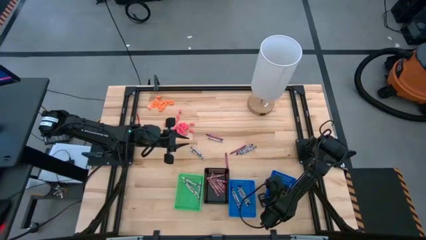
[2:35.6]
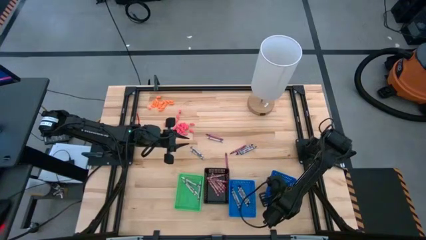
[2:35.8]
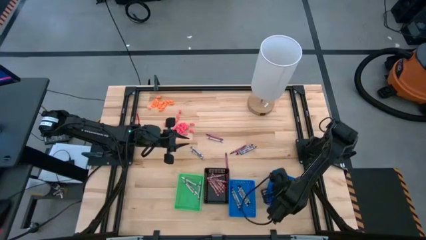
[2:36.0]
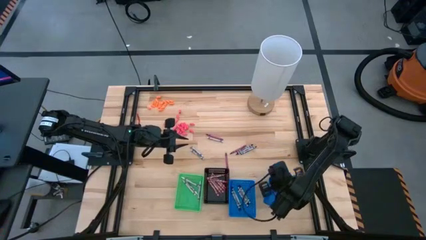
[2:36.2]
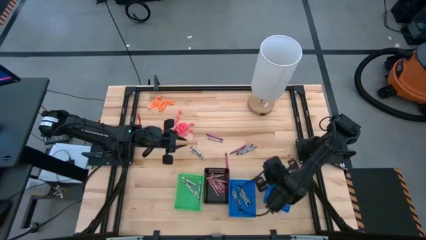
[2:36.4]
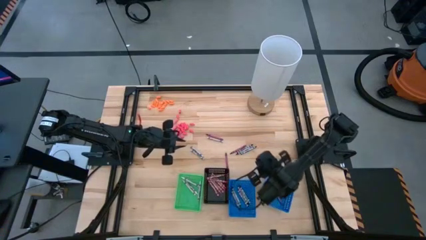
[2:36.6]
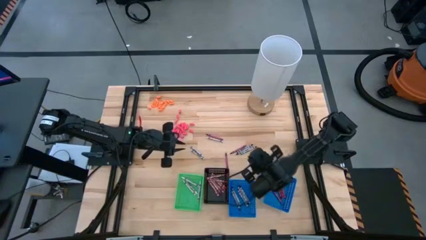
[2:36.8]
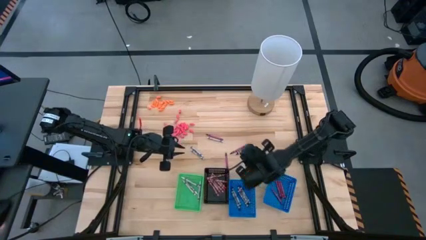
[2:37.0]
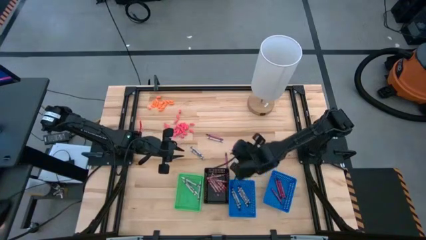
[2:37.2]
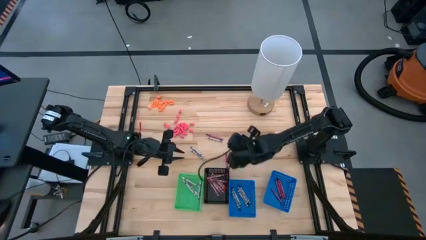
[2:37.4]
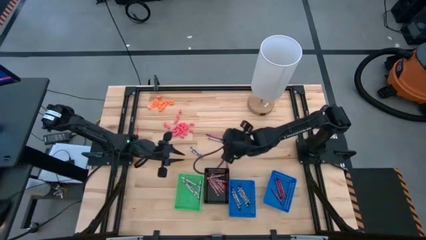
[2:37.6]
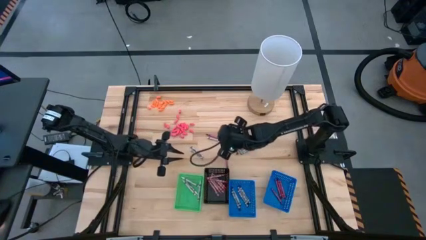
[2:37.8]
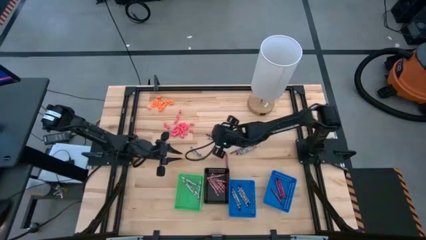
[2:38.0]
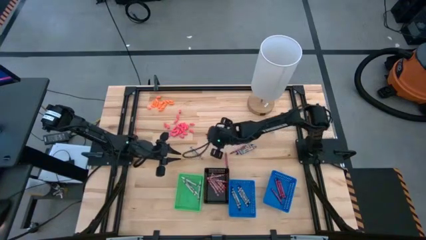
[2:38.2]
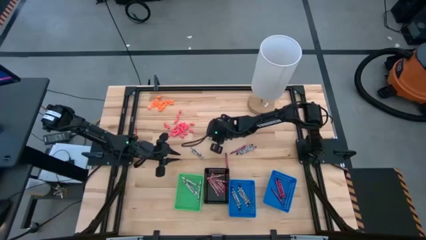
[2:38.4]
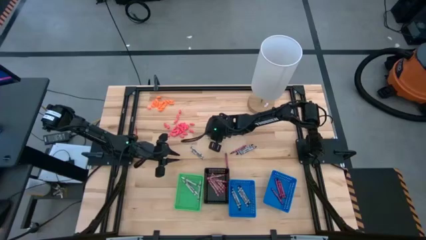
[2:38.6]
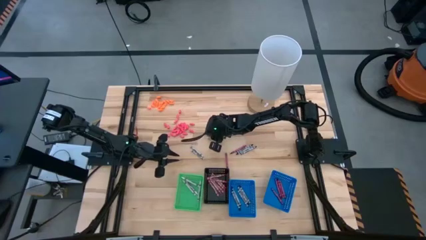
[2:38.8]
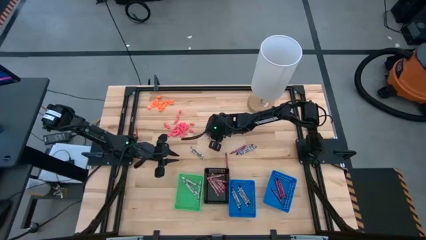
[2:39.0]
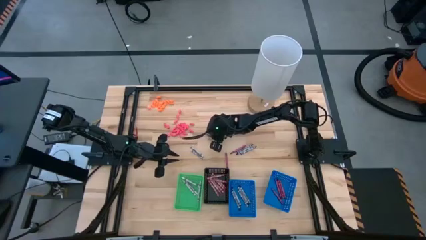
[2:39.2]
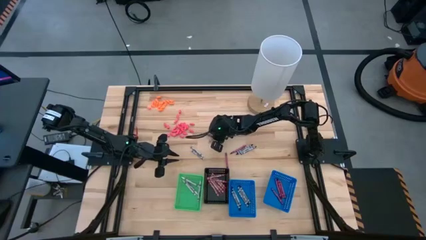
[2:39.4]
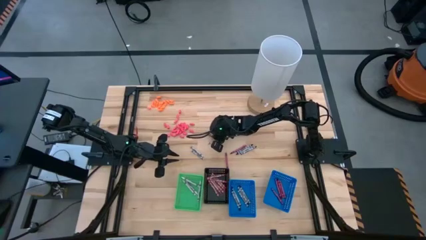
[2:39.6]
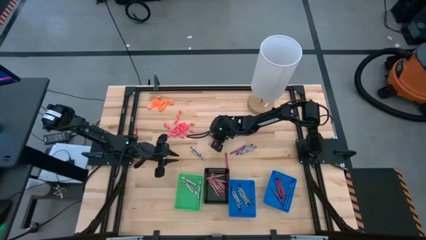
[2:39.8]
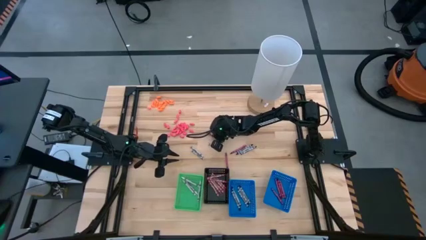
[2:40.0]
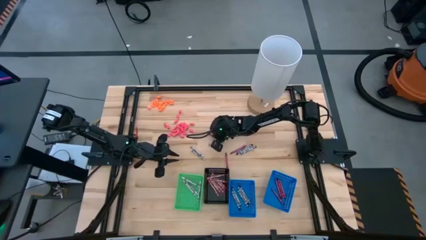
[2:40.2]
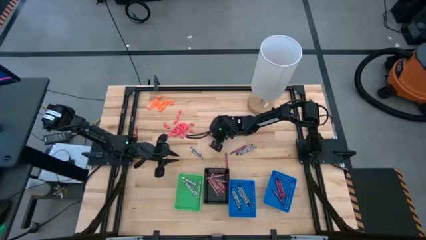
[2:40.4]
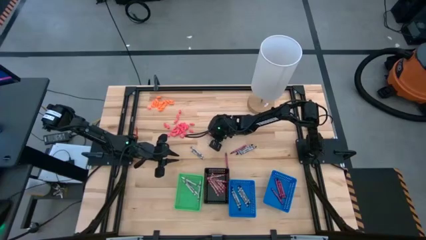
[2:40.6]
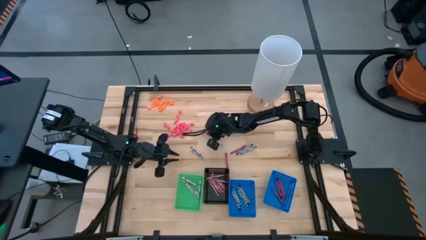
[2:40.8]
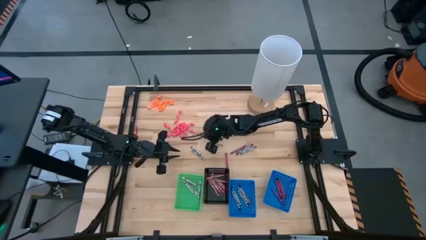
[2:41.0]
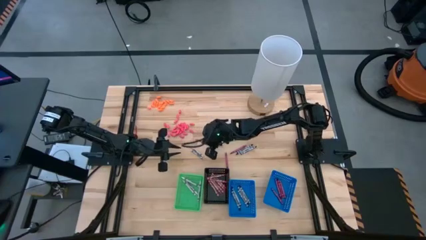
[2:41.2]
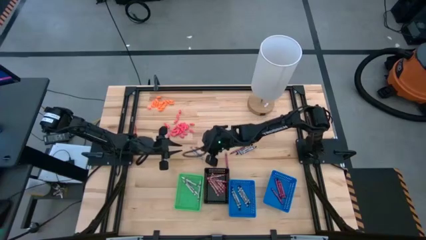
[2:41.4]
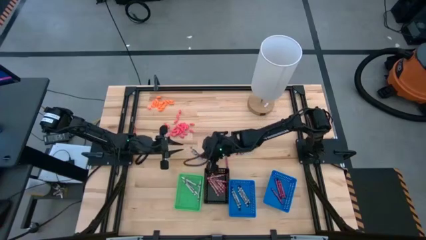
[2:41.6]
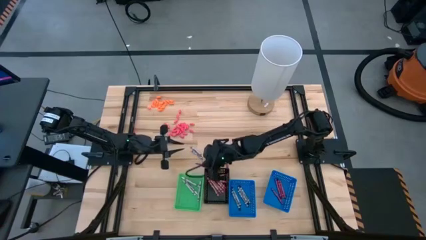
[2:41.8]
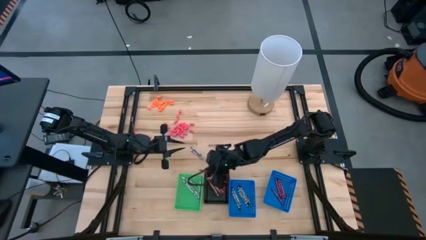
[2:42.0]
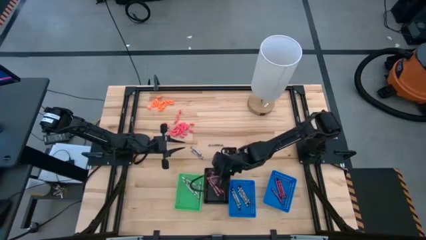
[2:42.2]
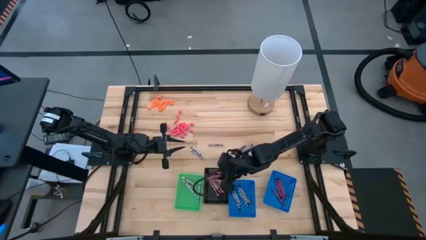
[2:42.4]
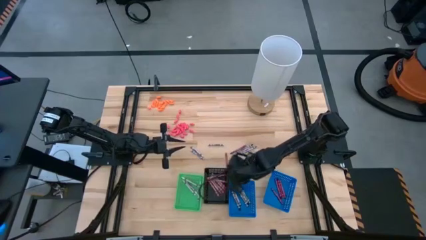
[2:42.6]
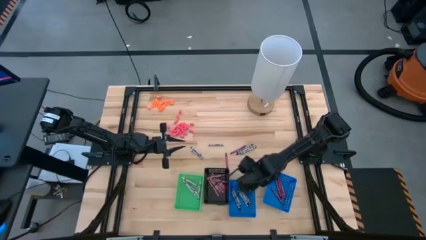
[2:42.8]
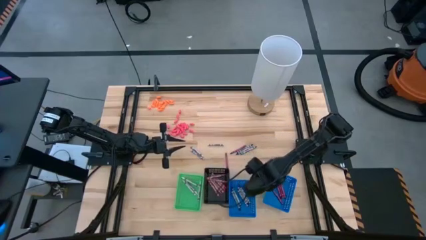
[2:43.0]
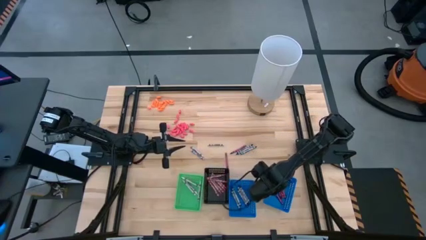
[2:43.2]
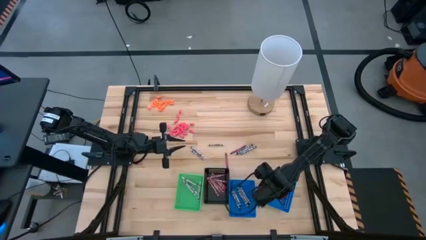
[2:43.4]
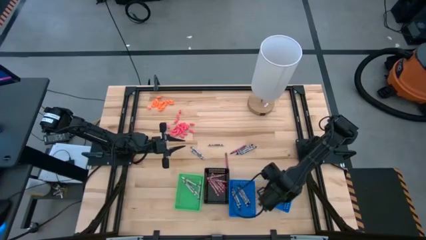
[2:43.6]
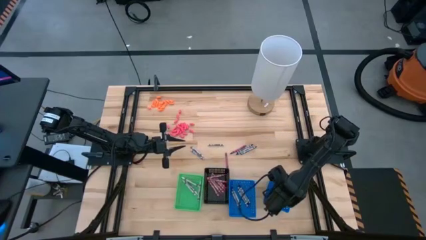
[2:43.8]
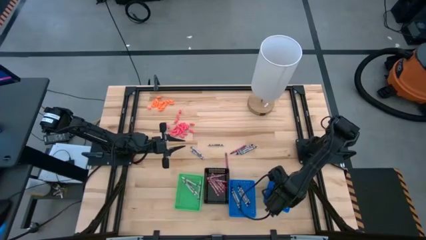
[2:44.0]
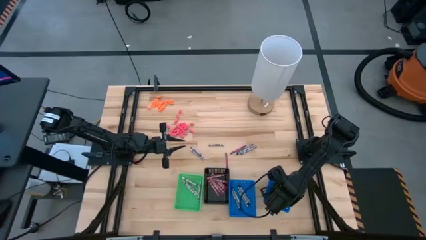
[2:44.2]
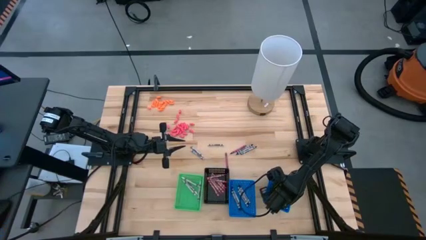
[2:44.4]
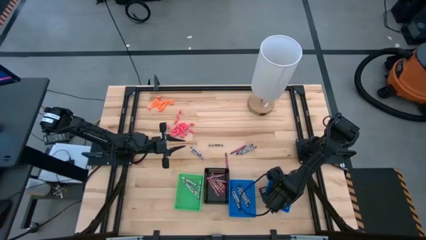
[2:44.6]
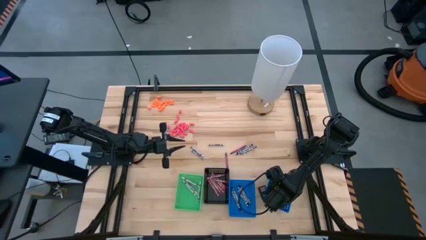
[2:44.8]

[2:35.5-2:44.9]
Task: Sort crayons
Put the red crayon into the right blue bin

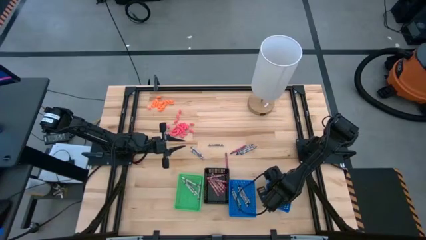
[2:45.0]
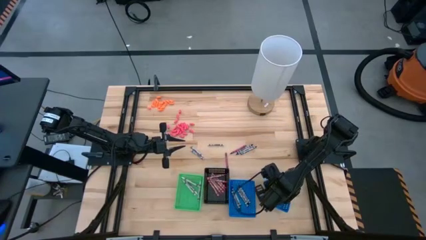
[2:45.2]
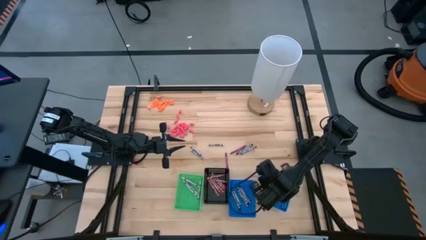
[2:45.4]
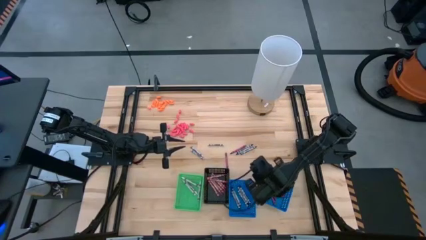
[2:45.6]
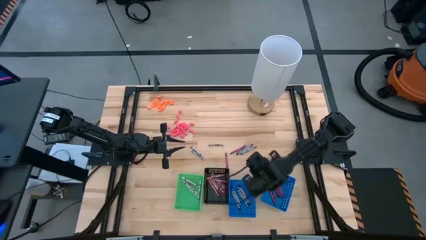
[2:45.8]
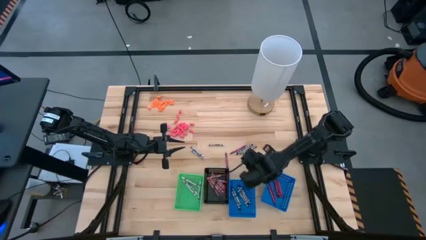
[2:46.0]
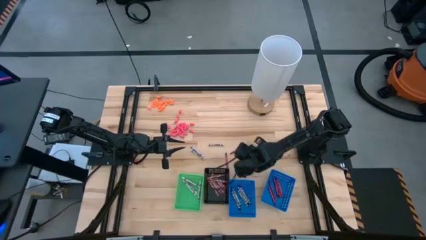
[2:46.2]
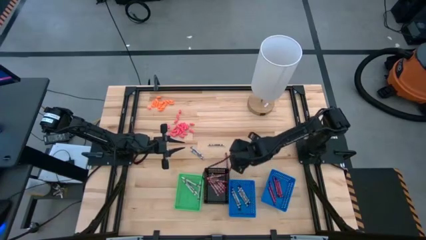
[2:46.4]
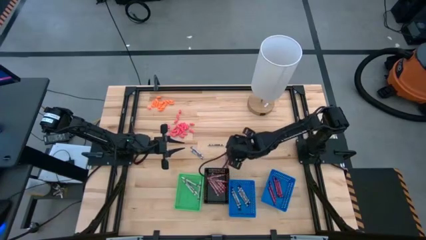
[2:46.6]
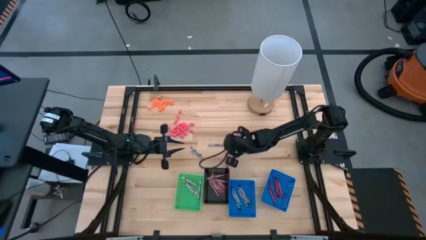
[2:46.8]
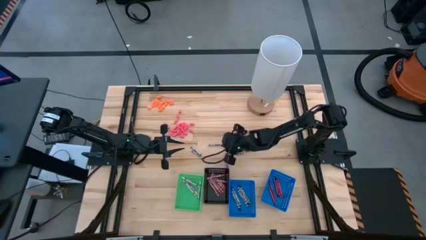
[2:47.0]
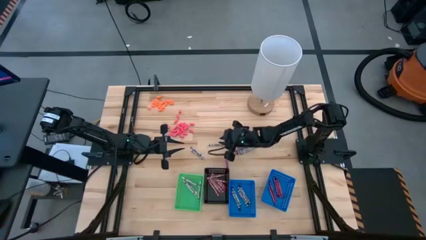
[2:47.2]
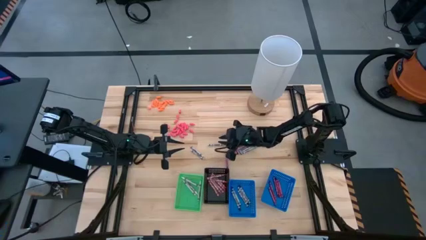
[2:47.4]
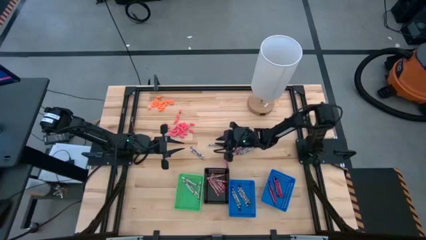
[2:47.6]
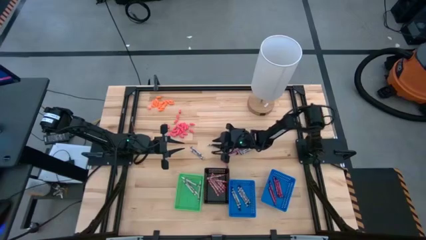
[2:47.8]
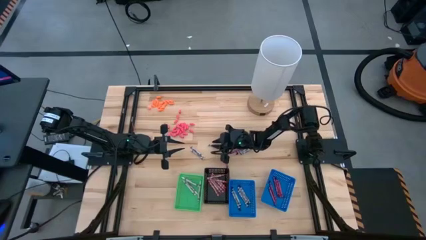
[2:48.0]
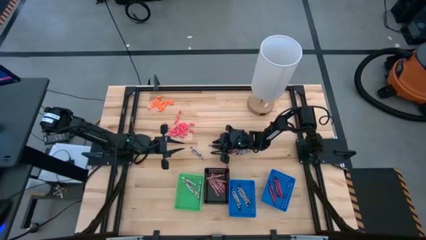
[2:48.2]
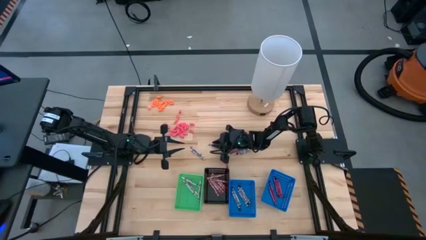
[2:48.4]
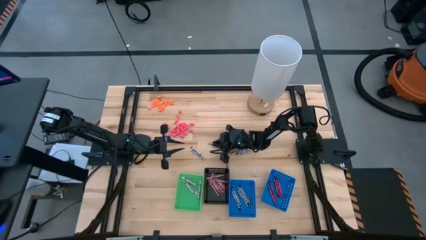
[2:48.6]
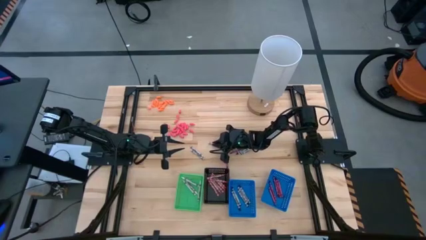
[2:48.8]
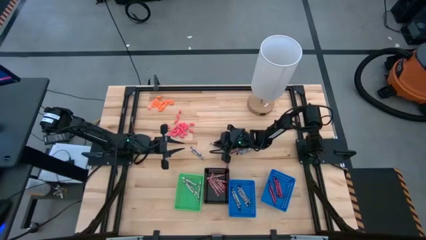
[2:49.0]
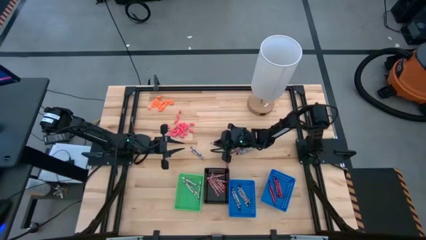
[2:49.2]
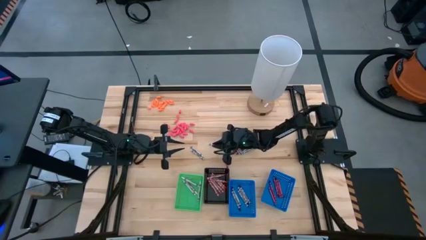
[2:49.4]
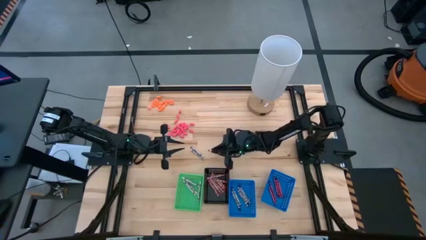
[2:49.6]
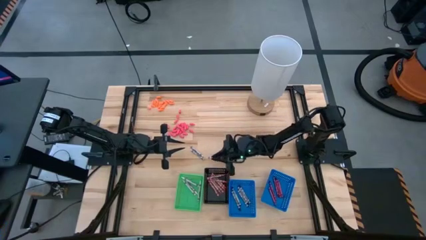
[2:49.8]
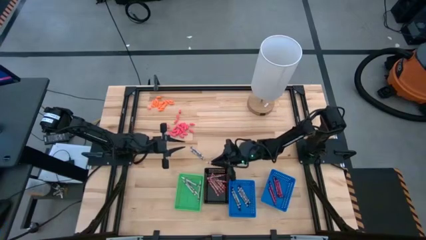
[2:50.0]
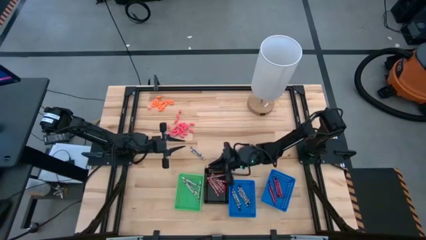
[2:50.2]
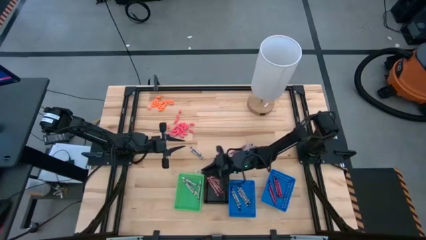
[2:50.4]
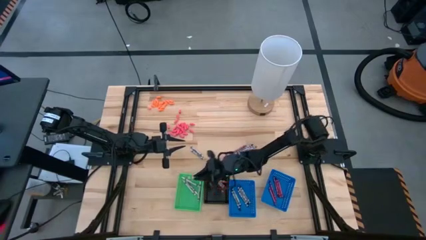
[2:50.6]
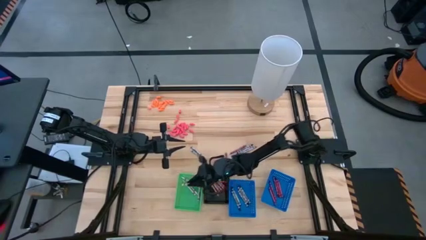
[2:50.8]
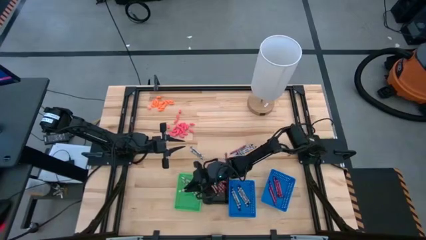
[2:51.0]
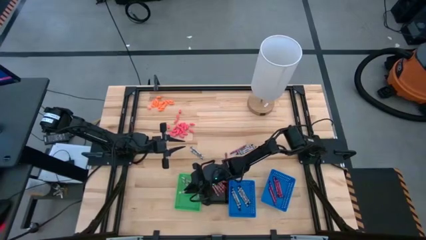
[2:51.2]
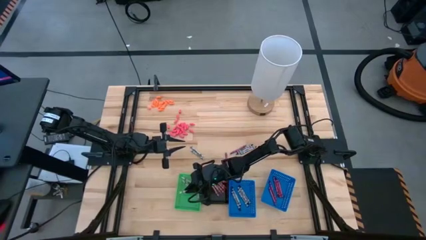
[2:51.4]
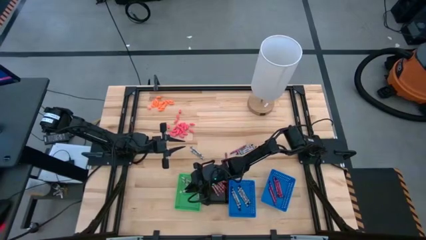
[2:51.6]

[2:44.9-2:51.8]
Put the white crayon into the green bin
